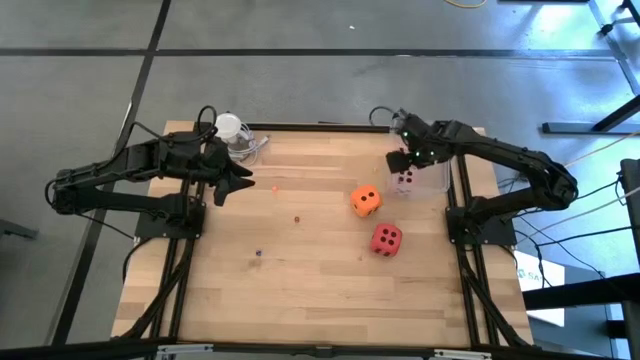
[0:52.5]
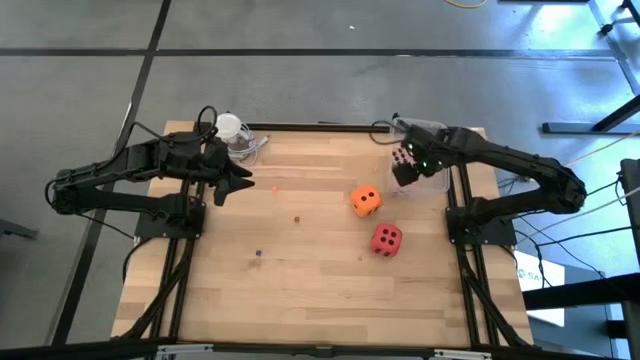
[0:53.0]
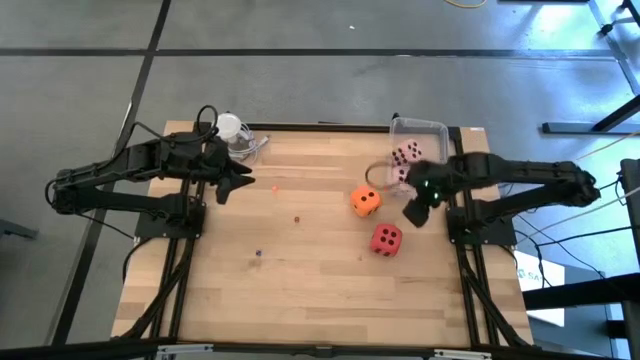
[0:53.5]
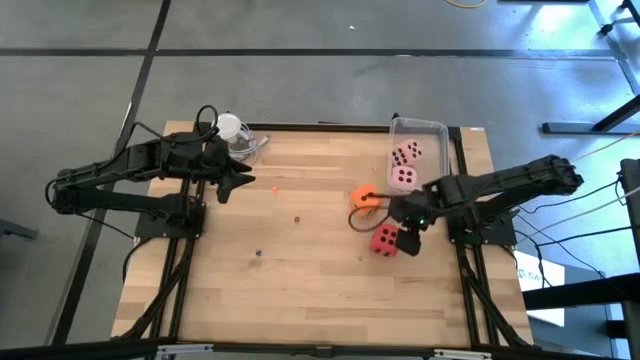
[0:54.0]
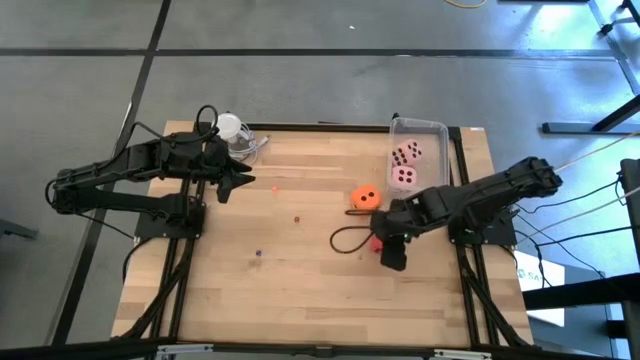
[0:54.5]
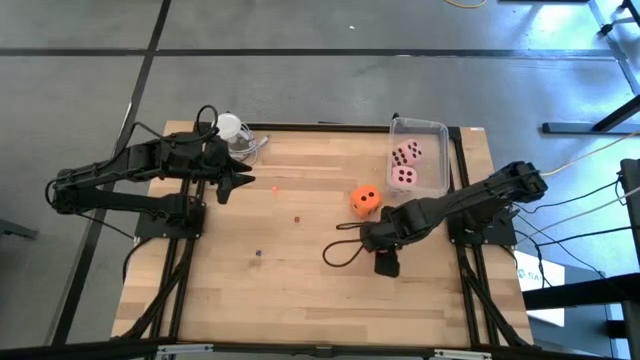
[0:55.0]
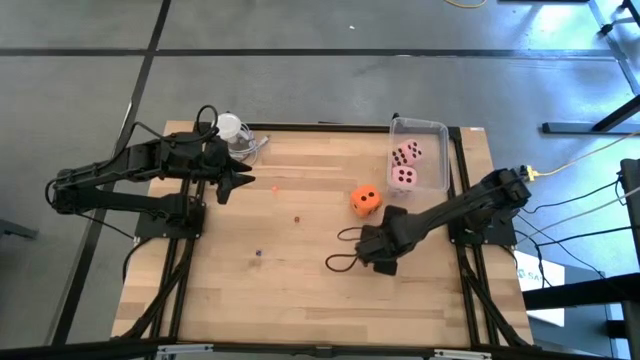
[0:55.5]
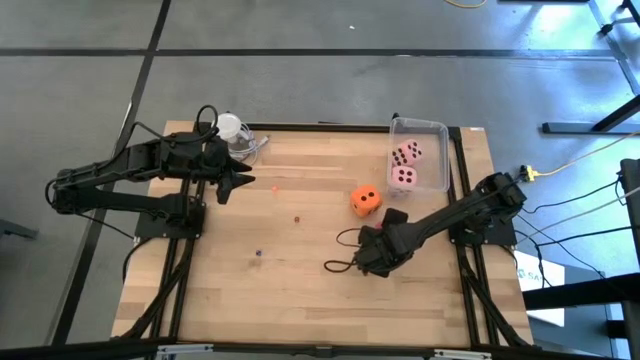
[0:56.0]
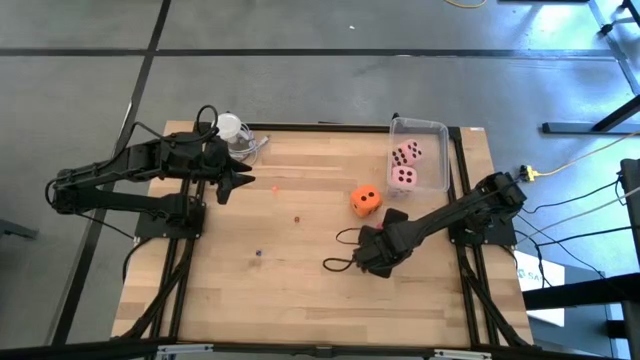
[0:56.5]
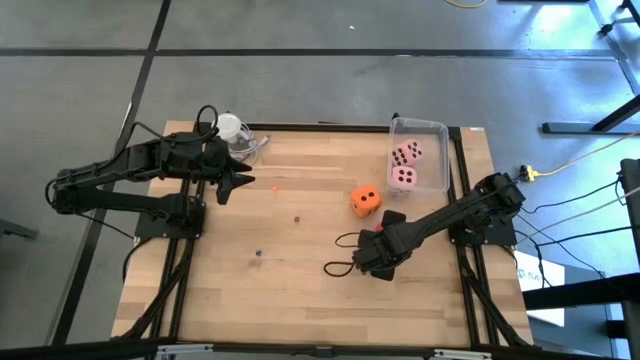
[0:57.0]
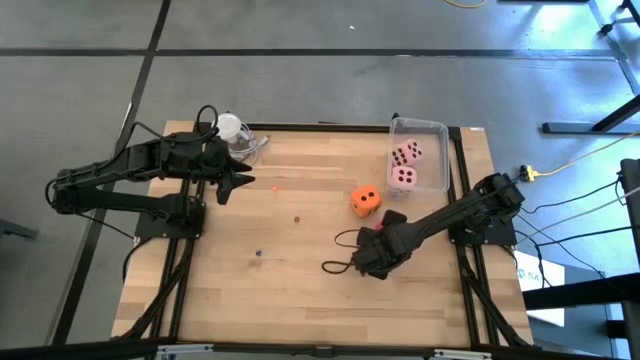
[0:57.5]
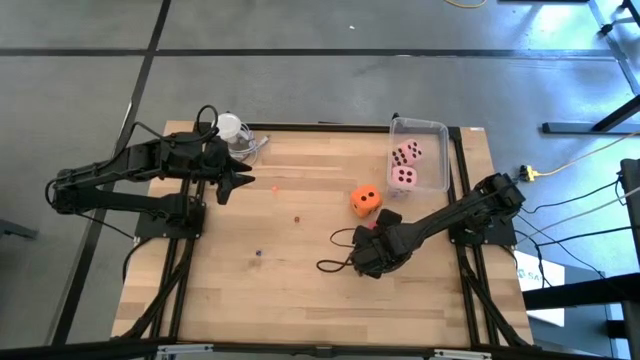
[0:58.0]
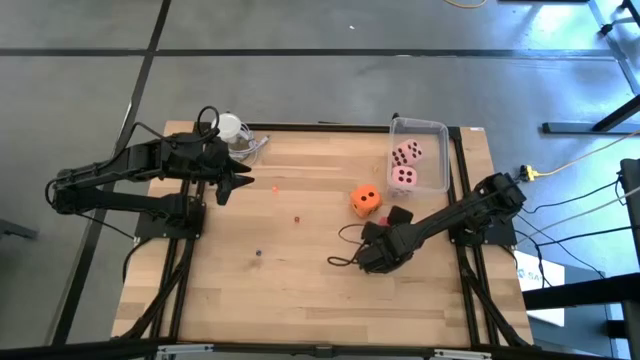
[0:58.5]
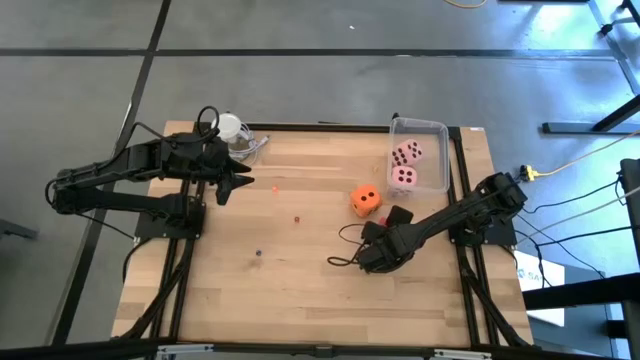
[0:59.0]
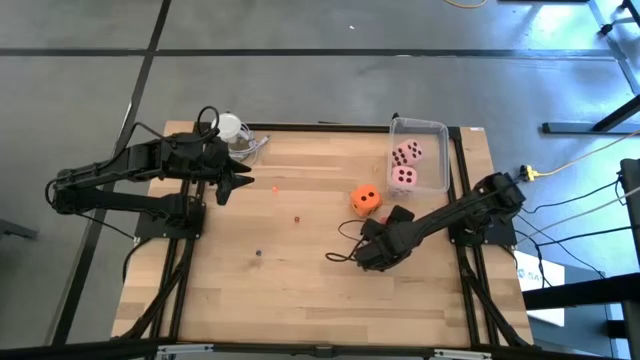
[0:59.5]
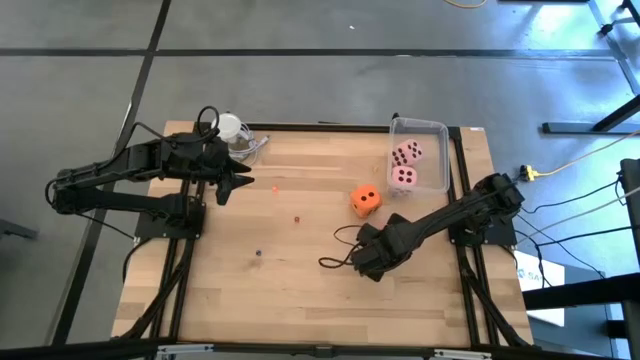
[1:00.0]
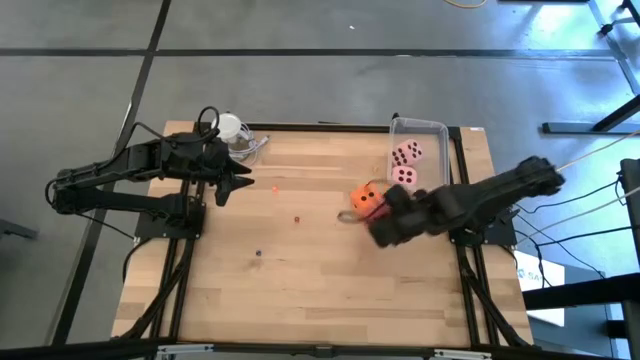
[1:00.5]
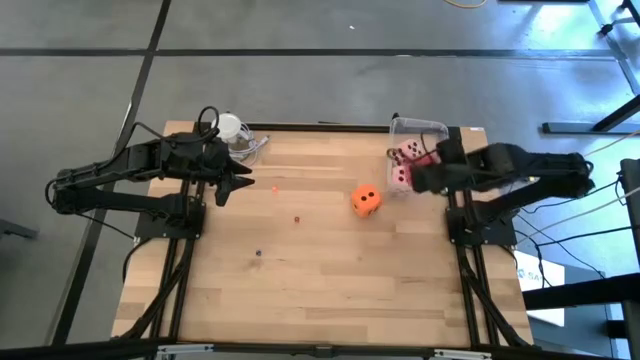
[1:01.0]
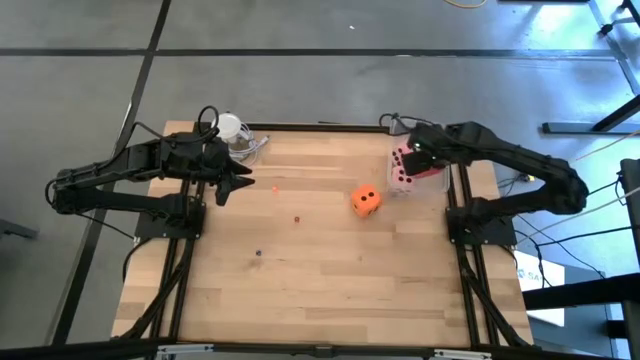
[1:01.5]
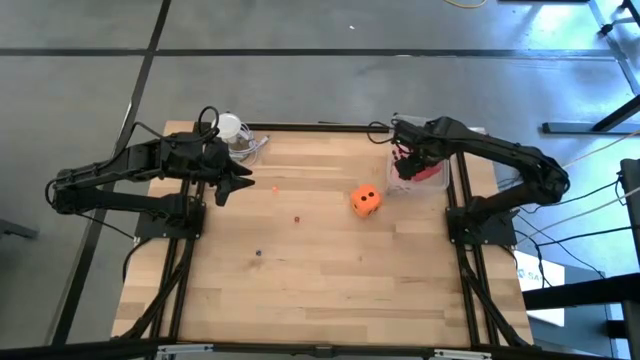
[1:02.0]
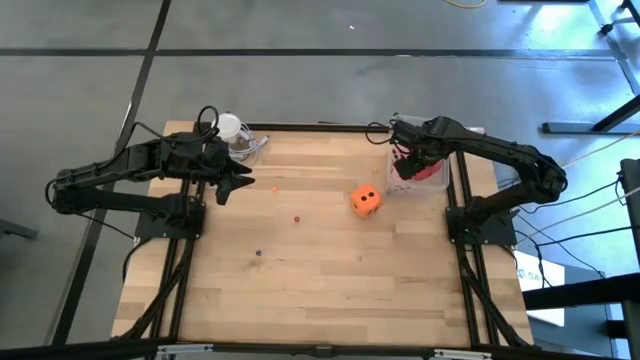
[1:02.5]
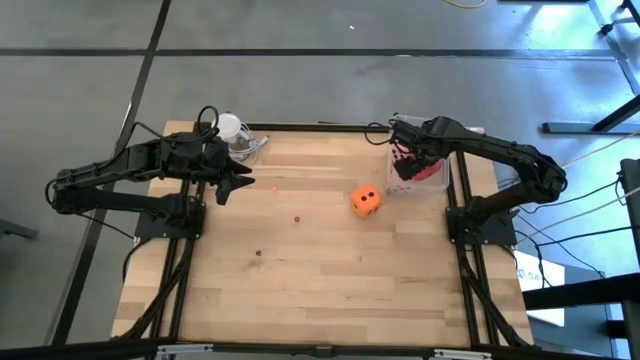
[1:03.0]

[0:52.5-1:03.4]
Task: Pick & Place Dice
Put the large red die into the container

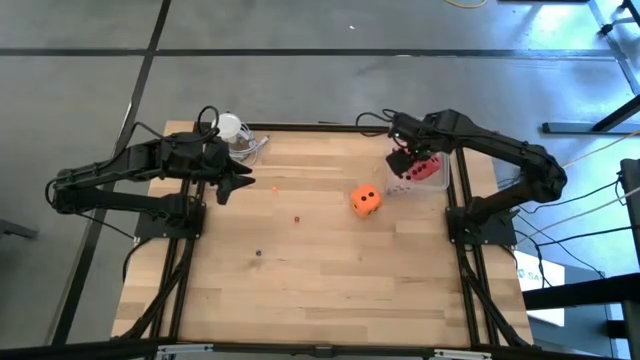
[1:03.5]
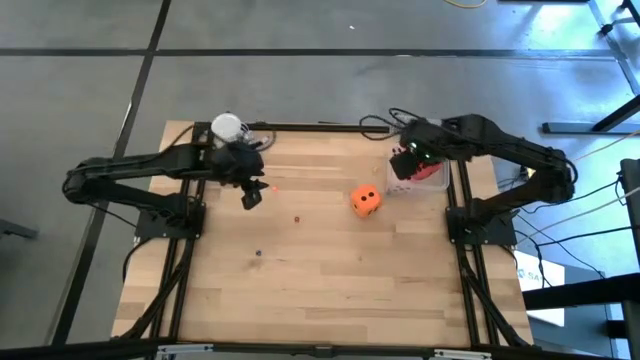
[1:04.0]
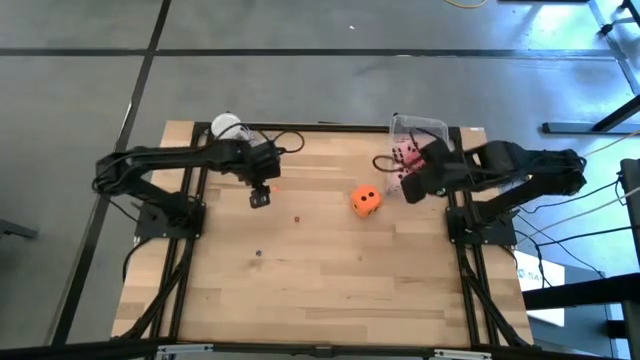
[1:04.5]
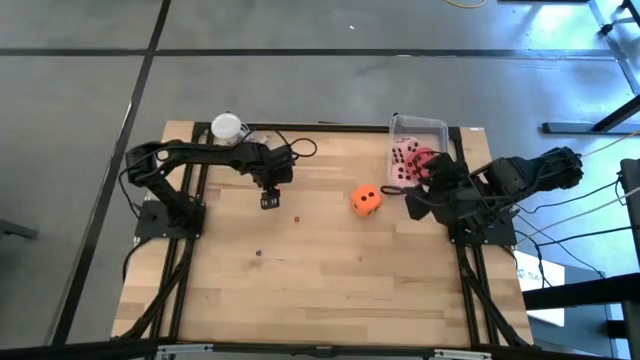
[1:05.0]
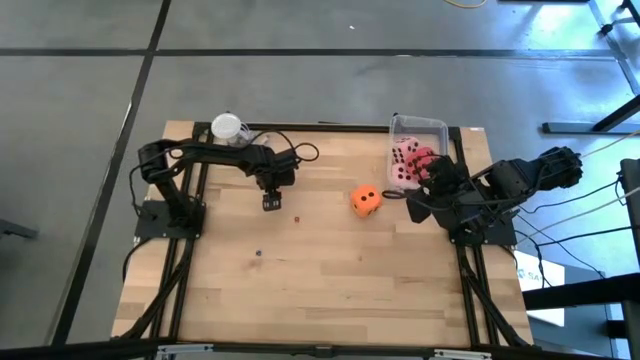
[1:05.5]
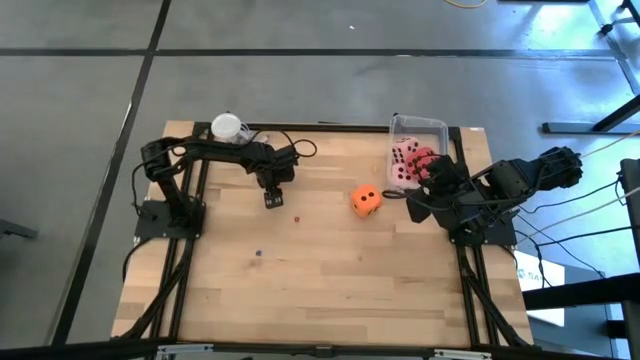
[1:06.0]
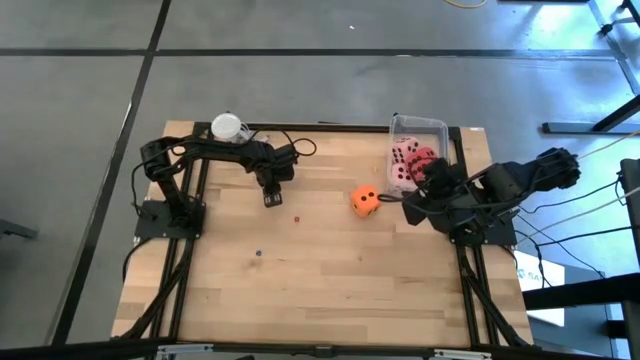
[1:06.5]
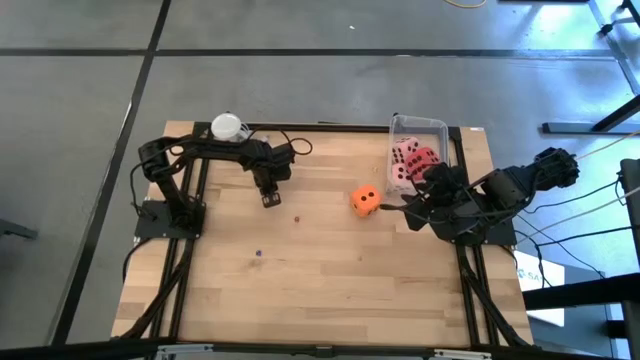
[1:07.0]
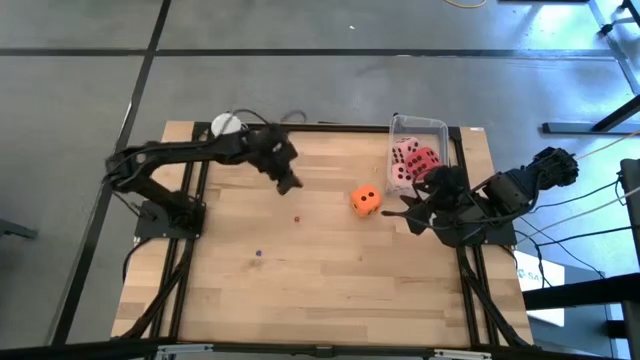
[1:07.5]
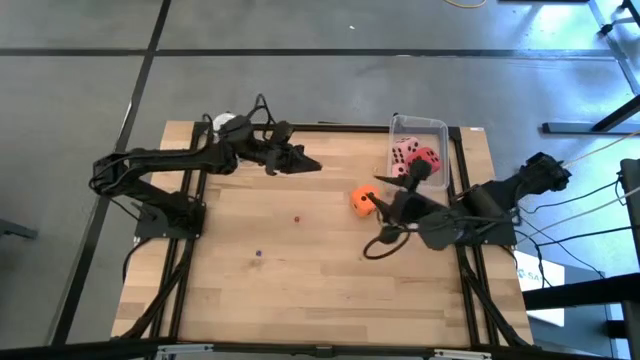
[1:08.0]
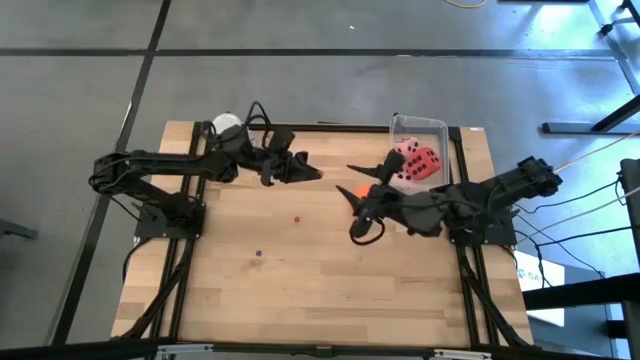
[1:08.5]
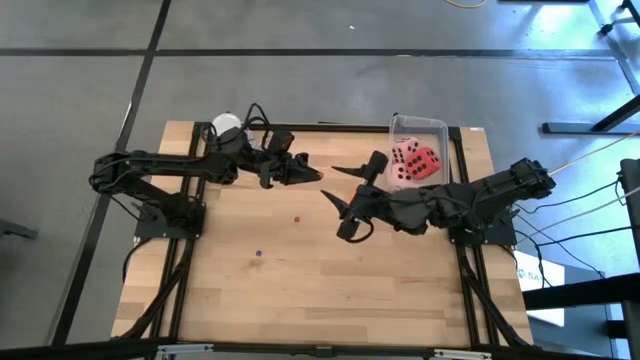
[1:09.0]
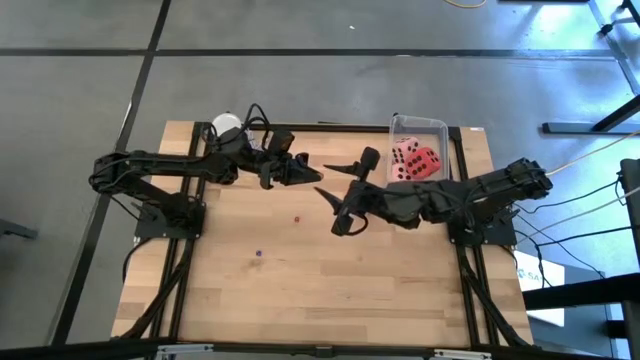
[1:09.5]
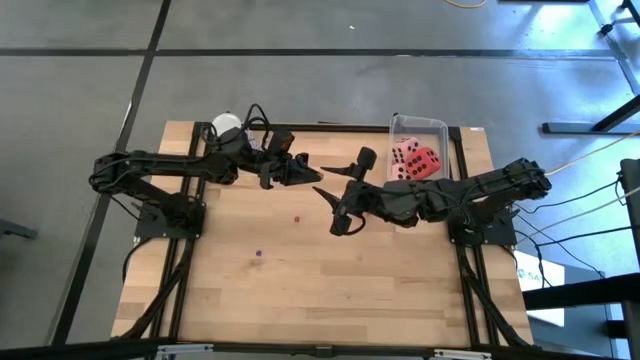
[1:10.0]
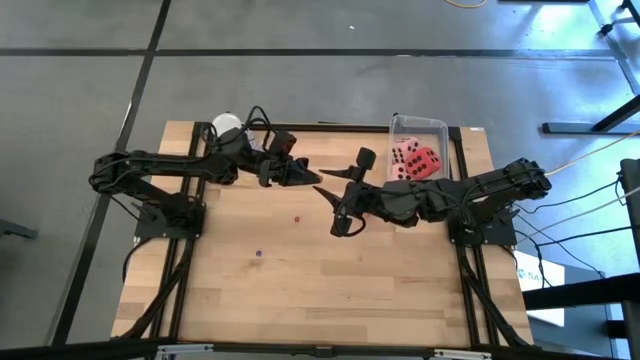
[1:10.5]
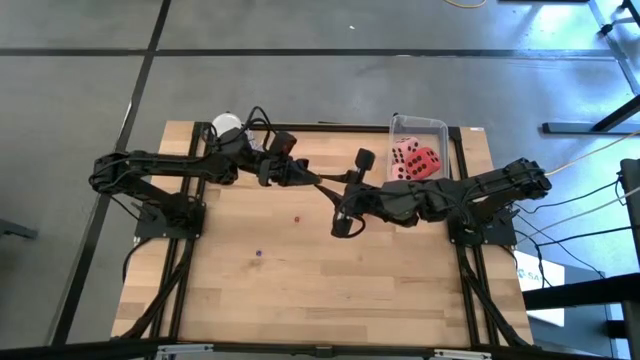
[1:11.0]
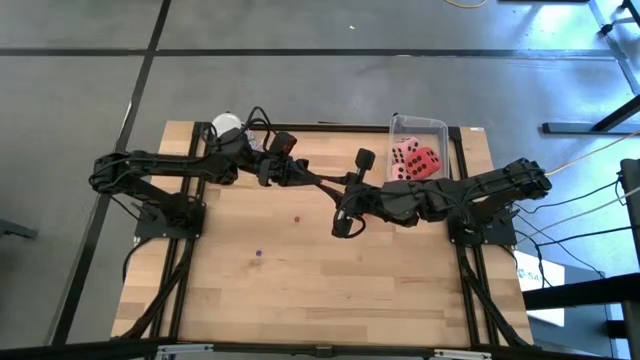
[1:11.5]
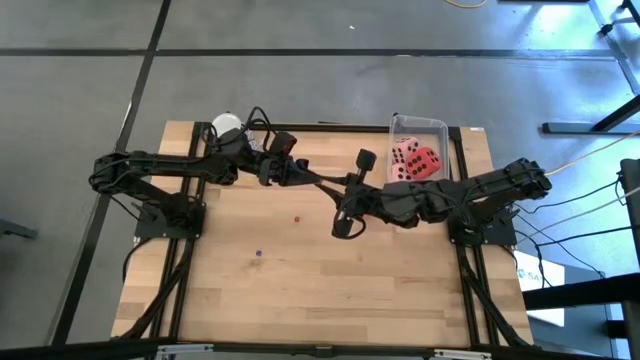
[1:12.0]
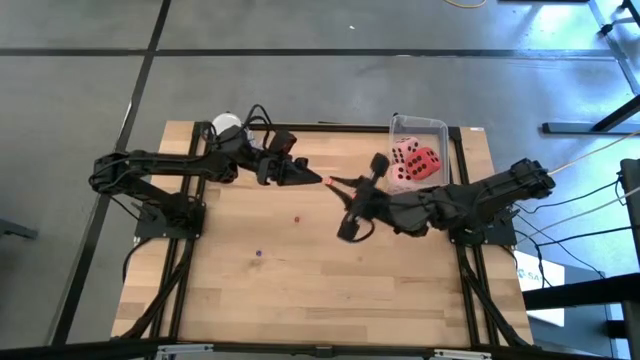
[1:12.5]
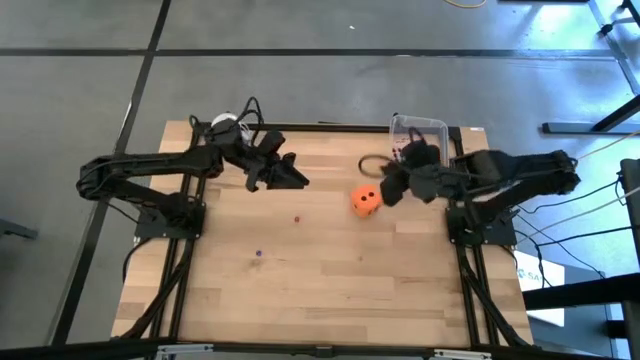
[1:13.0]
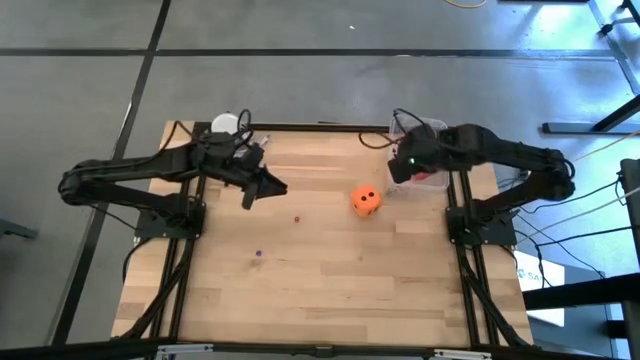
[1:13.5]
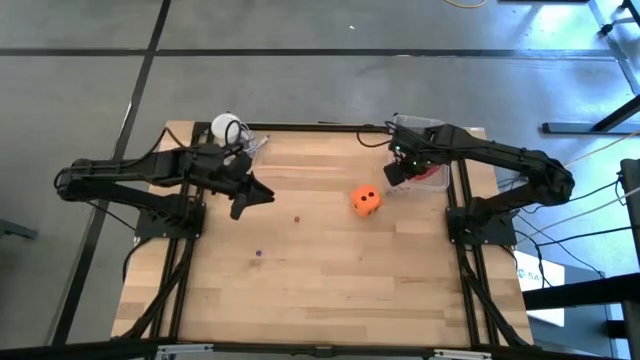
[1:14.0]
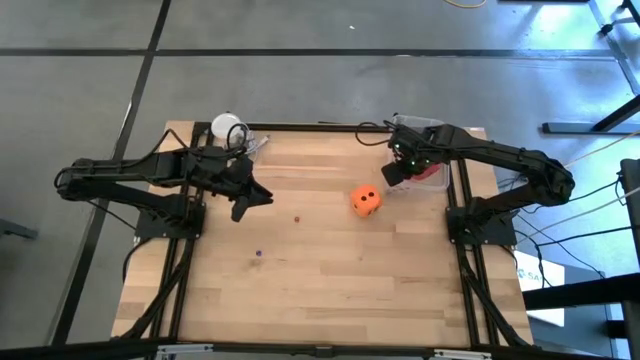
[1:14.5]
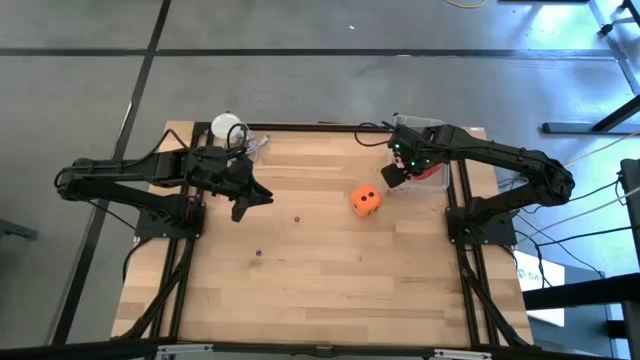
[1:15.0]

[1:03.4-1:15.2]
Put the small orange die into the container
